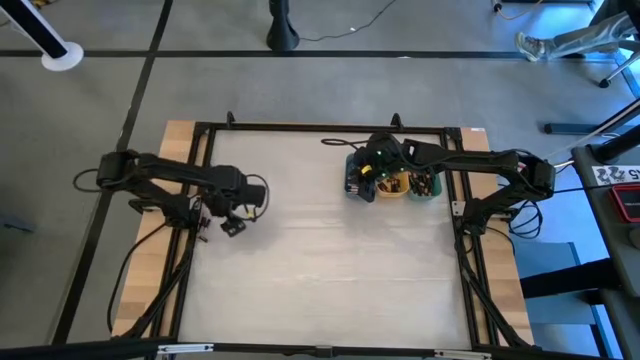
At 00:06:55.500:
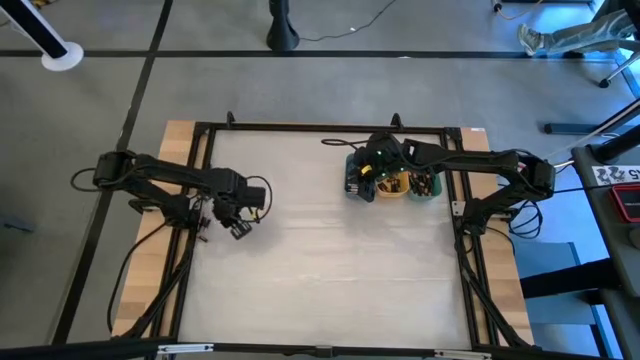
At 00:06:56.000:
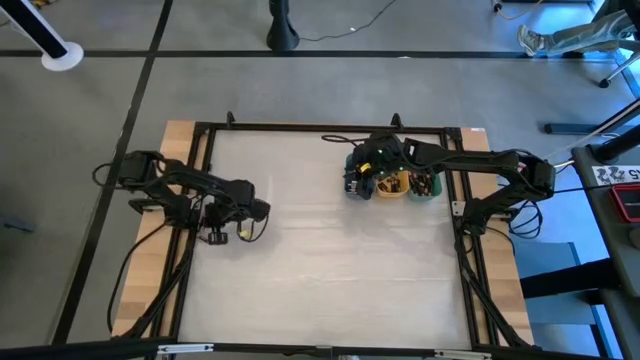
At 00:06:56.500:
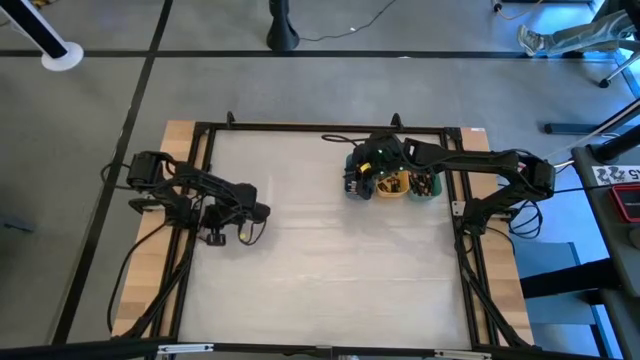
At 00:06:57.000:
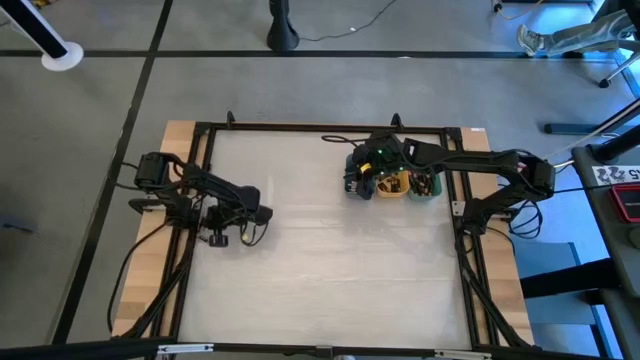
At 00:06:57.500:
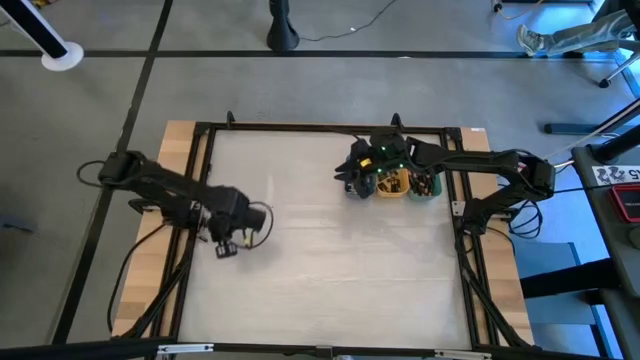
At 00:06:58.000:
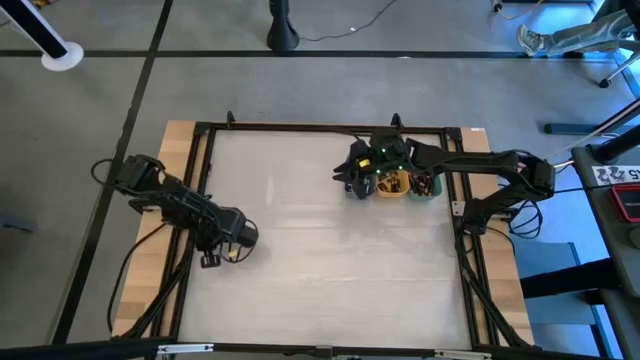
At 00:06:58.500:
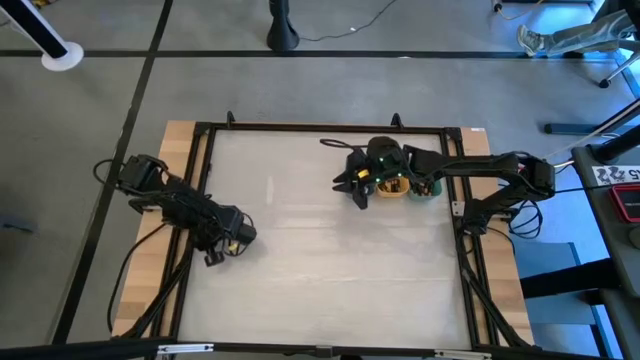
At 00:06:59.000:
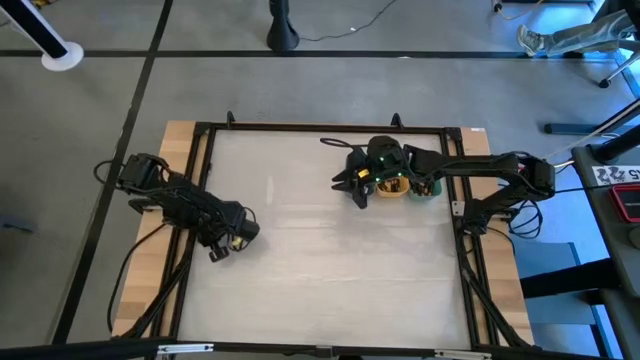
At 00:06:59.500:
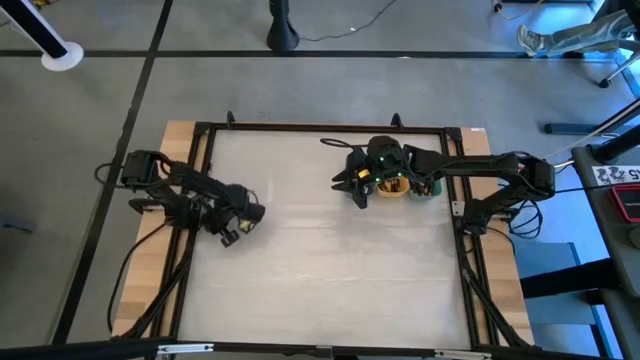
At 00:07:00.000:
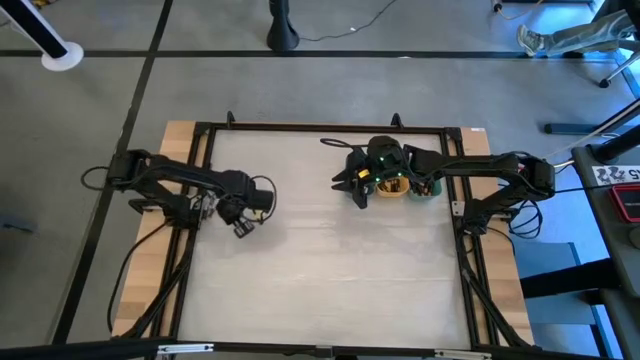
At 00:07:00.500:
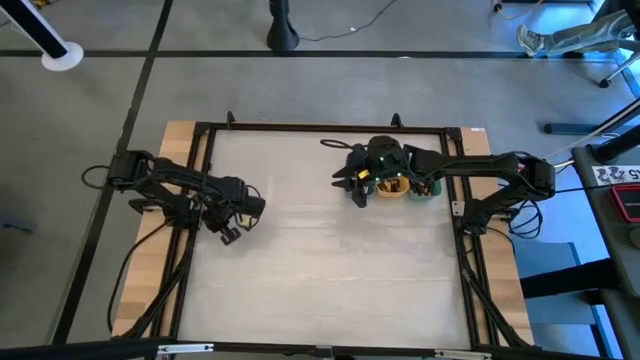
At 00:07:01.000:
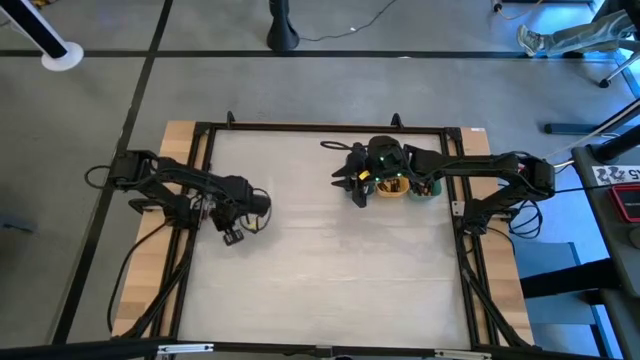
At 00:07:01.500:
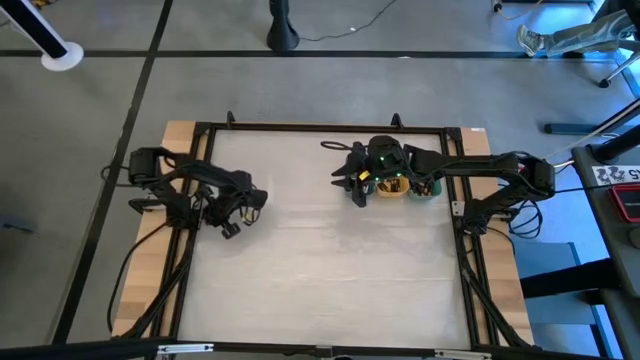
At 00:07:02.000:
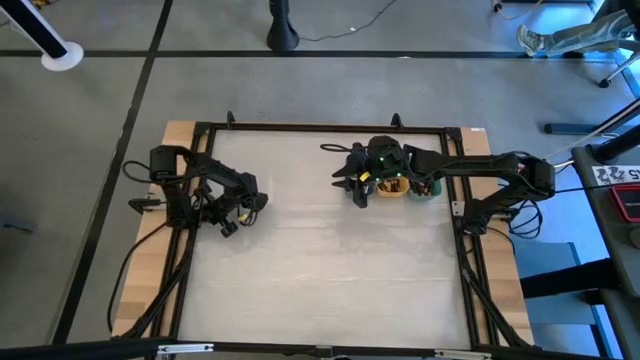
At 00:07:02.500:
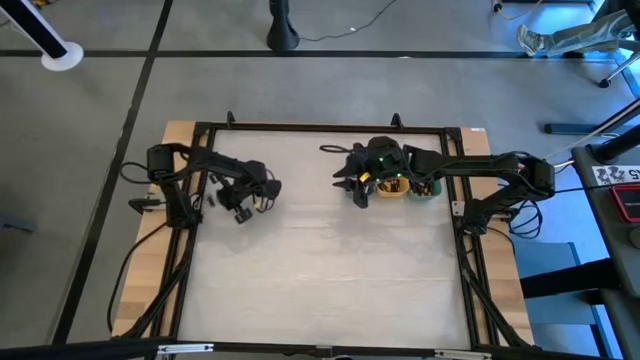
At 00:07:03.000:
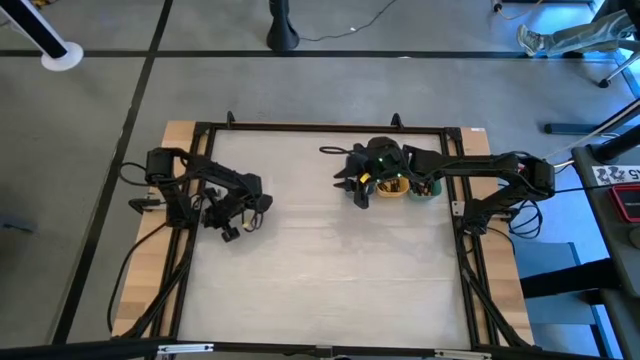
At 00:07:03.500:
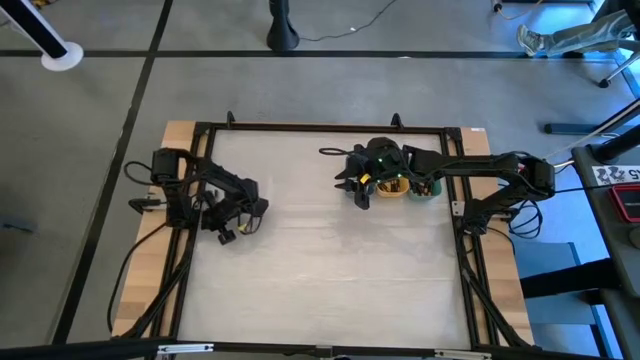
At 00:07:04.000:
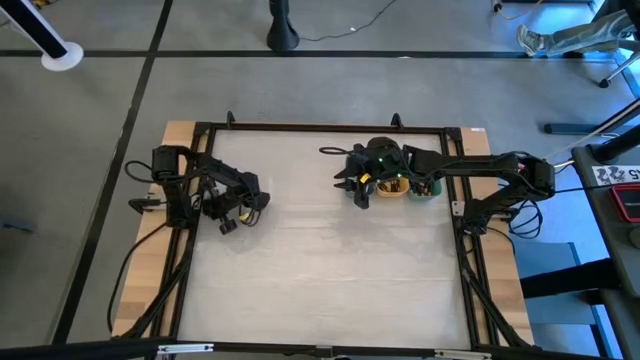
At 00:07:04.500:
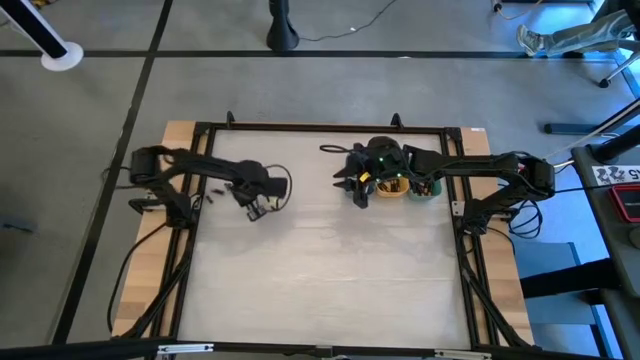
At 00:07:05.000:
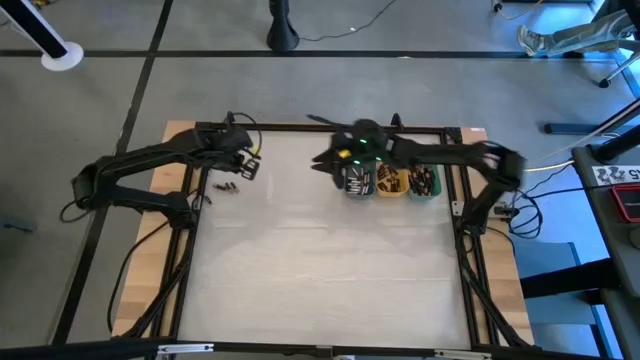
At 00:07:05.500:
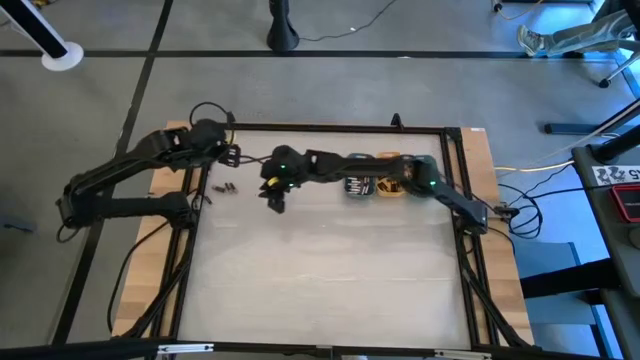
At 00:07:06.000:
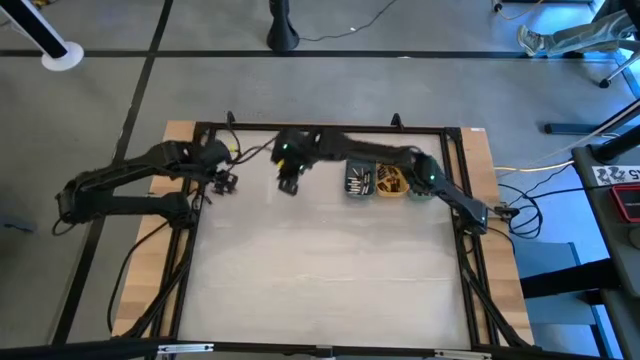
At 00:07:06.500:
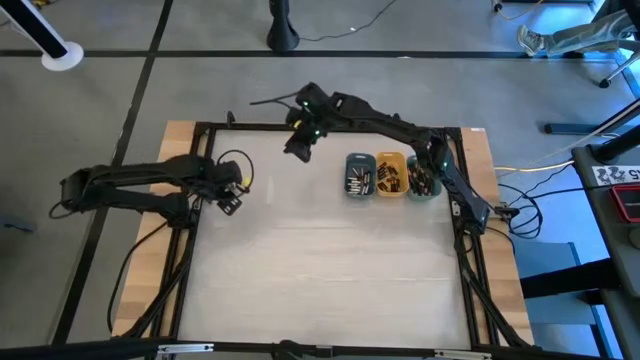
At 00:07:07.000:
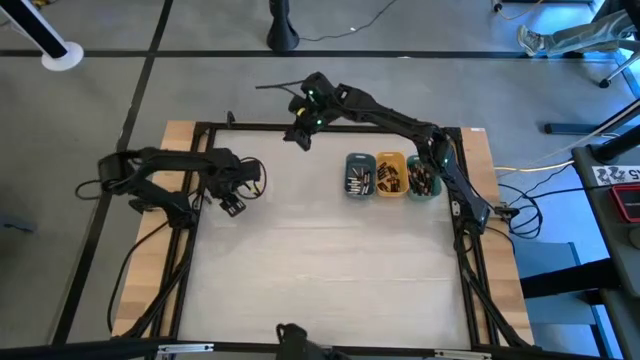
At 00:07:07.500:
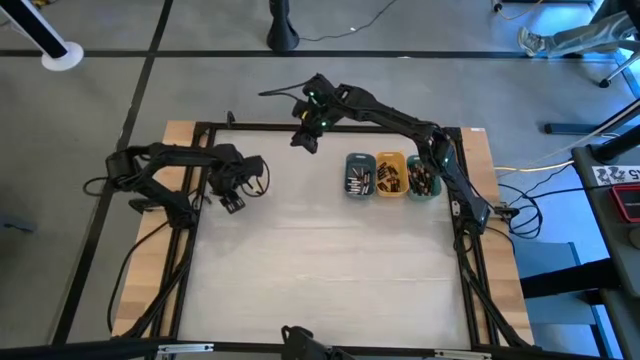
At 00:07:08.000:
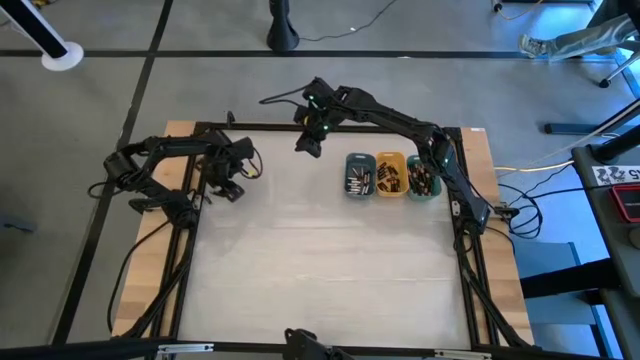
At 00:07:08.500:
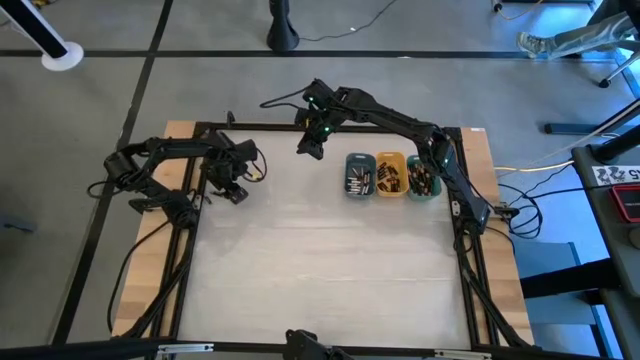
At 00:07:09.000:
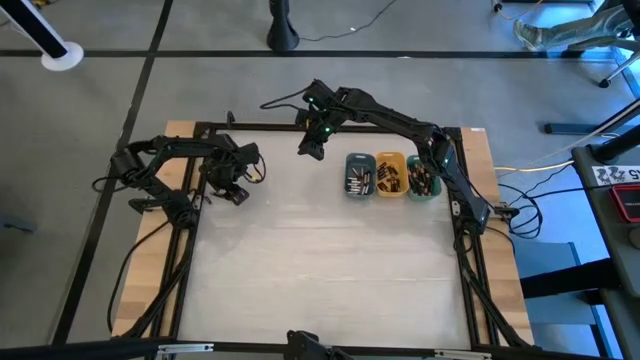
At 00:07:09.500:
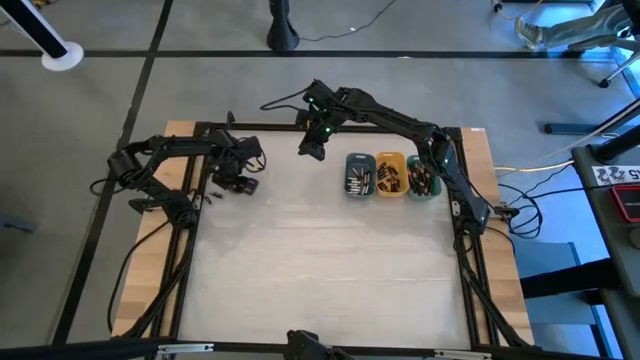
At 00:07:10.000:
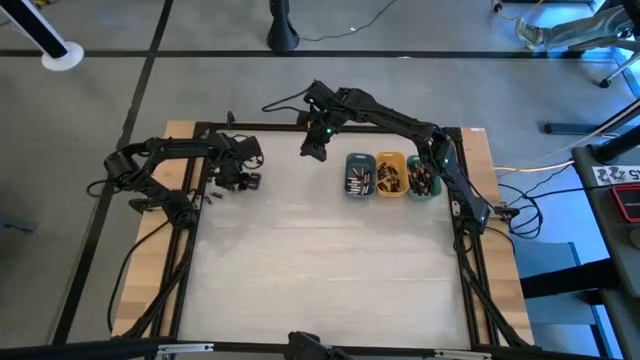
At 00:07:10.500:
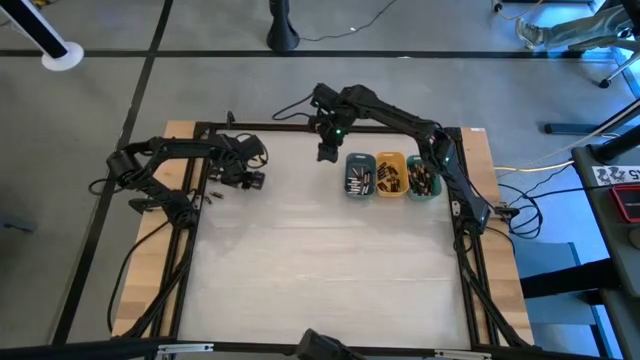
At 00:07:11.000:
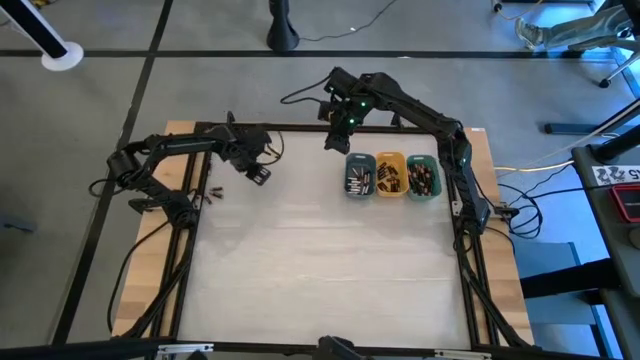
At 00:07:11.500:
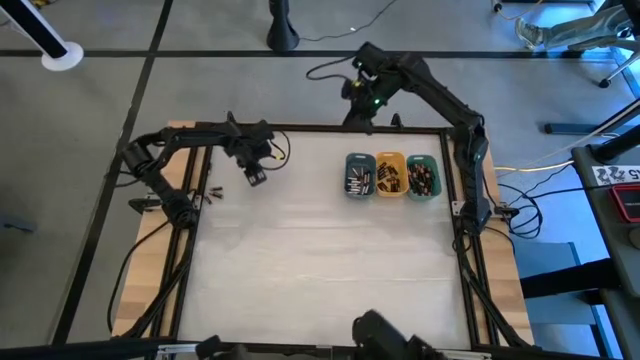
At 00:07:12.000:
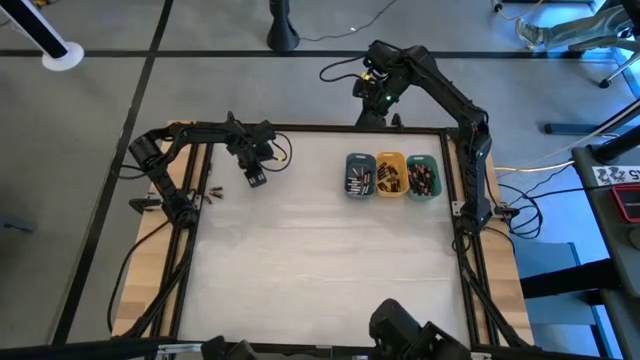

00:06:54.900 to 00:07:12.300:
Task: Sort batteries
Put the black into the yellow bin

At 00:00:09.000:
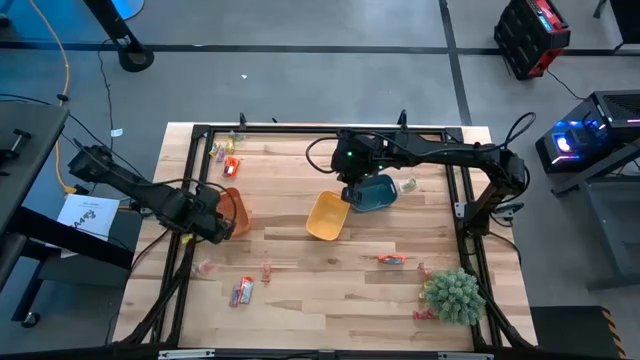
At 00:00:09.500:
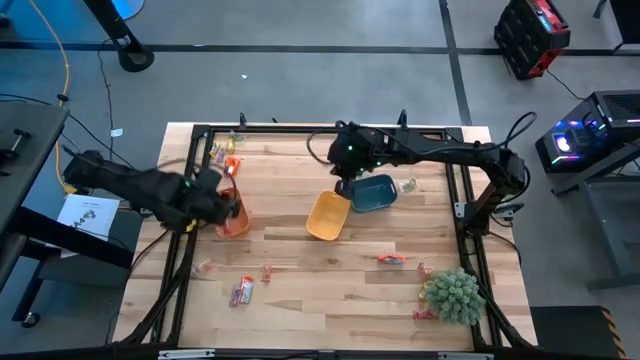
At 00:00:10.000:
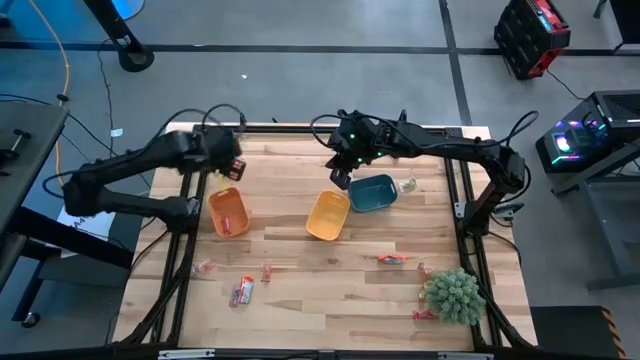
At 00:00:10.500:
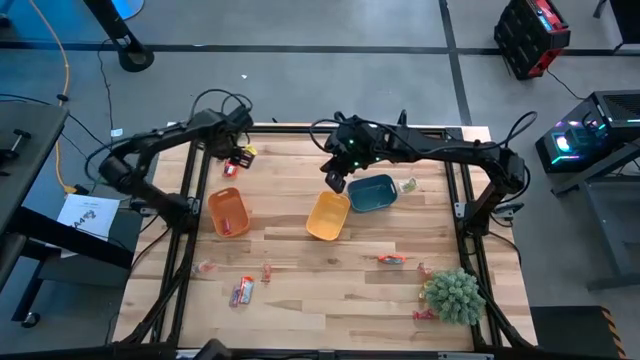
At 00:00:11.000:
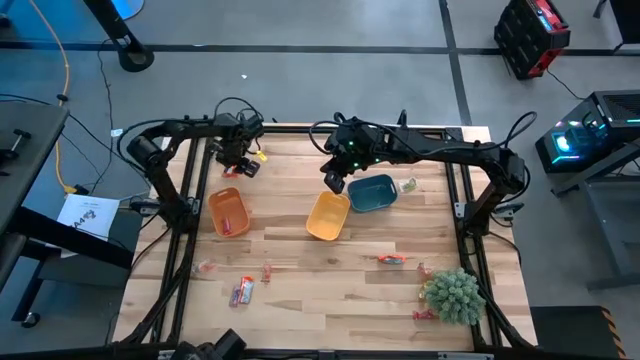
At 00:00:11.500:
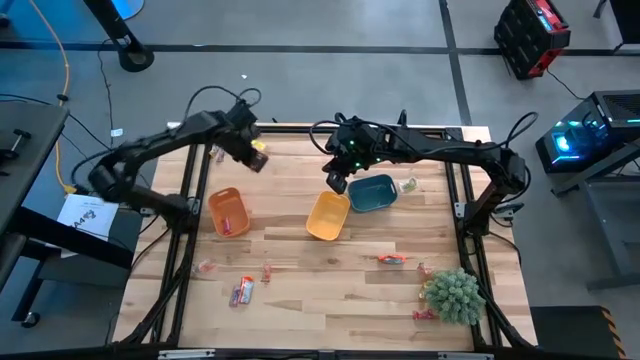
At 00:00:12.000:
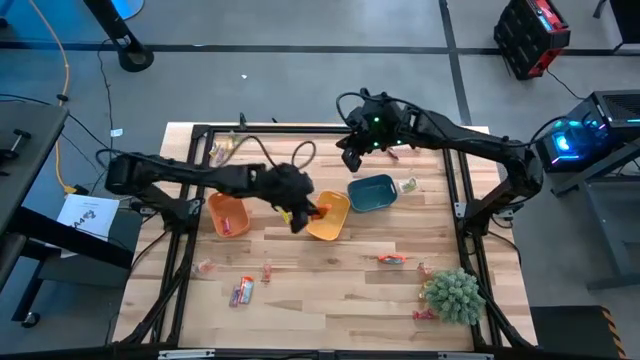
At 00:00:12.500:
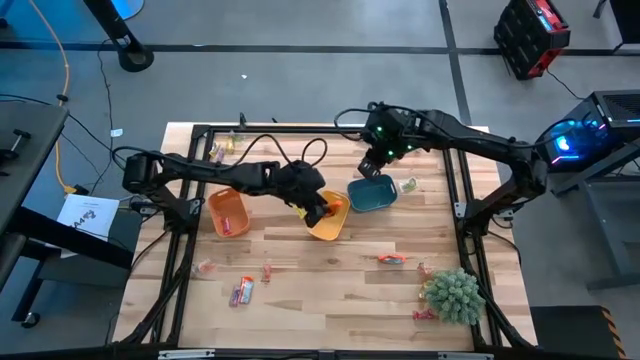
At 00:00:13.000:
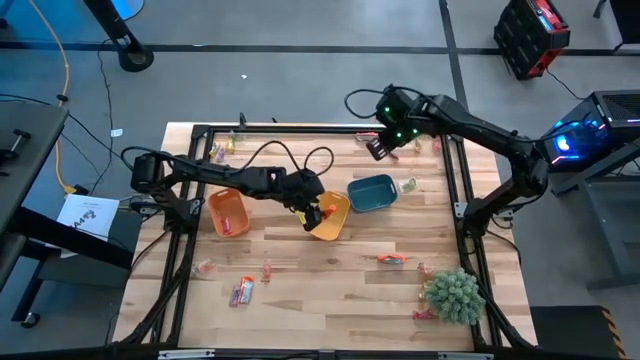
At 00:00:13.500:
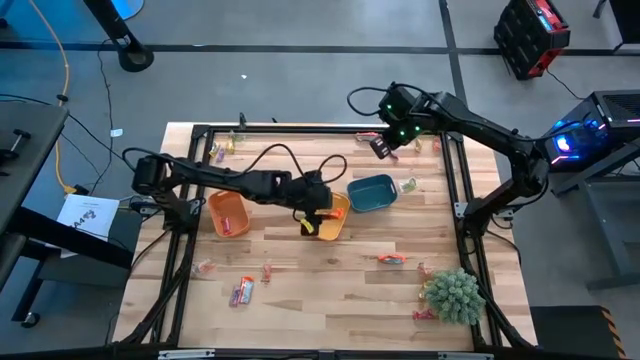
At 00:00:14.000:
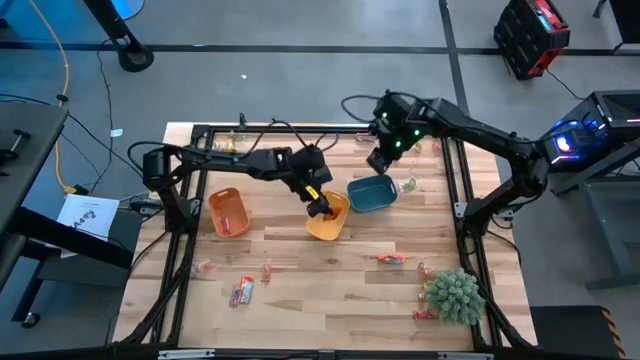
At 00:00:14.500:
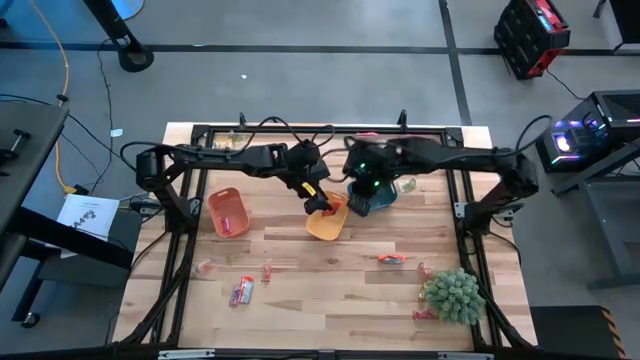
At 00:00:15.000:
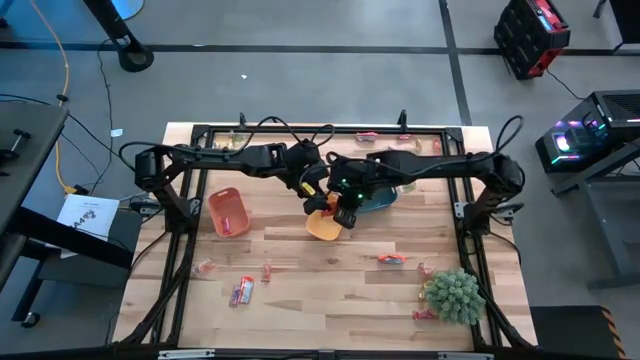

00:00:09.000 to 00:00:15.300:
Task: Sort candy
Put the orange chocolate into the yellow bin
